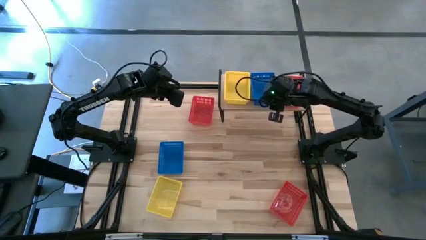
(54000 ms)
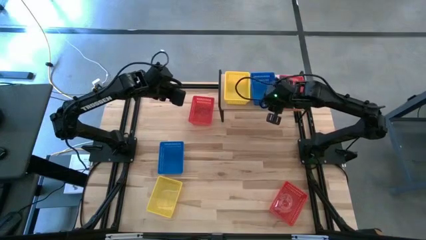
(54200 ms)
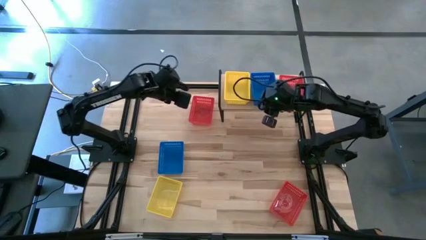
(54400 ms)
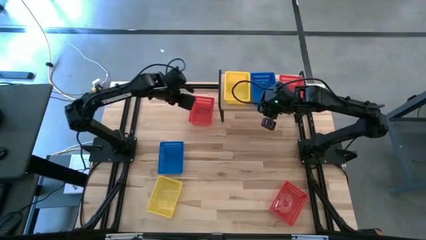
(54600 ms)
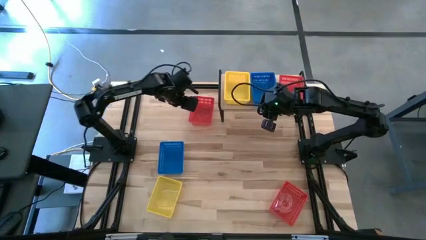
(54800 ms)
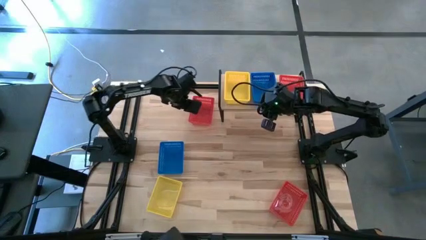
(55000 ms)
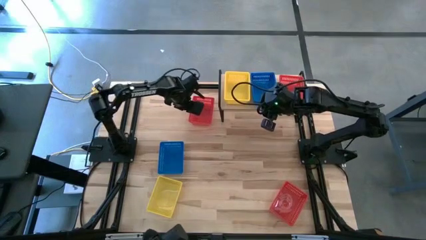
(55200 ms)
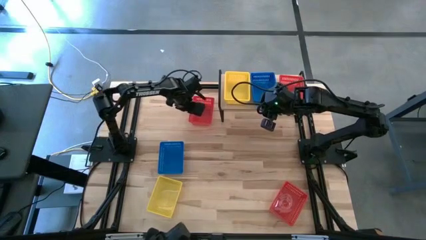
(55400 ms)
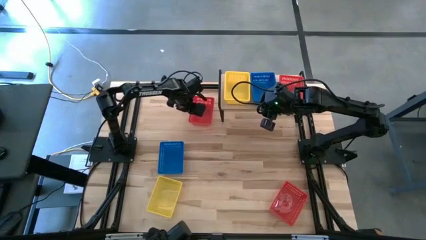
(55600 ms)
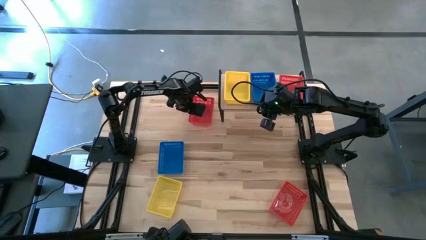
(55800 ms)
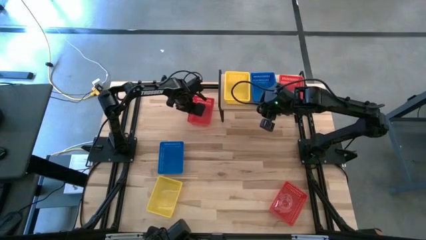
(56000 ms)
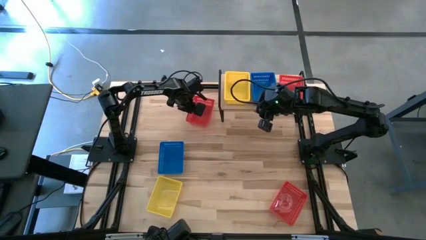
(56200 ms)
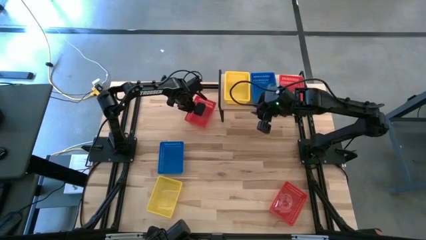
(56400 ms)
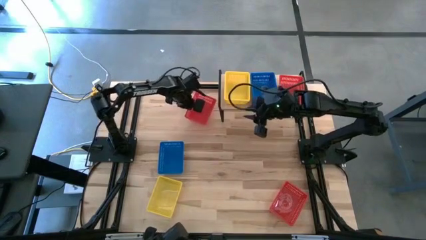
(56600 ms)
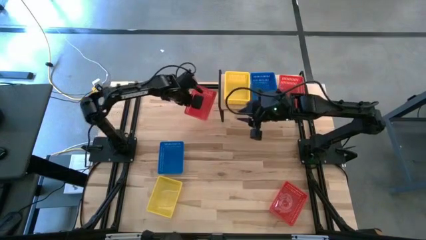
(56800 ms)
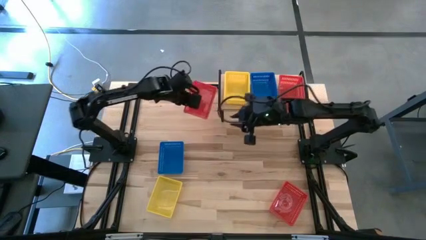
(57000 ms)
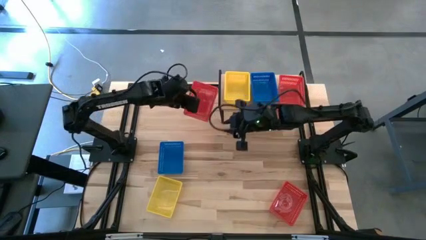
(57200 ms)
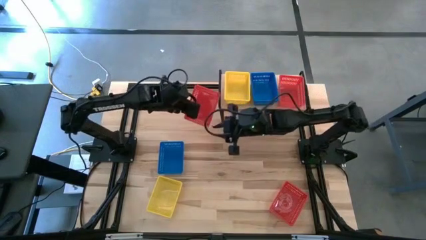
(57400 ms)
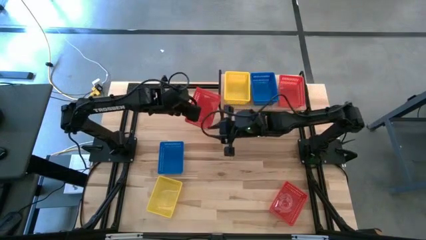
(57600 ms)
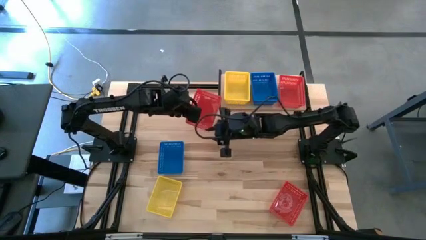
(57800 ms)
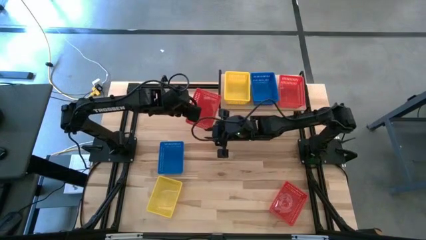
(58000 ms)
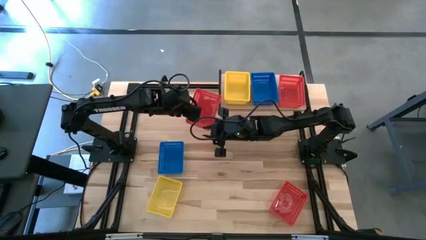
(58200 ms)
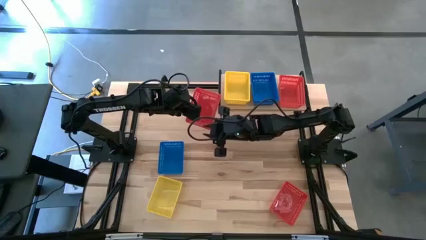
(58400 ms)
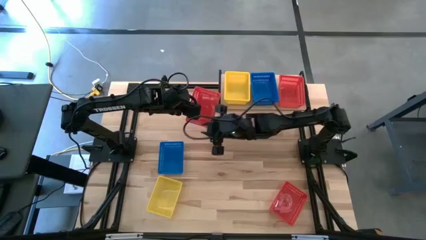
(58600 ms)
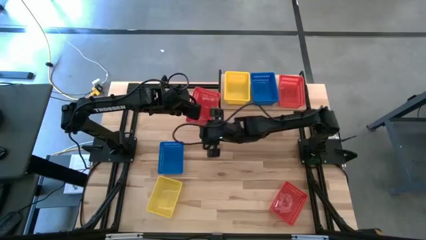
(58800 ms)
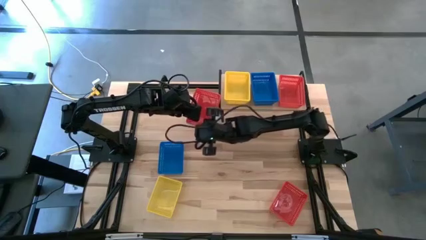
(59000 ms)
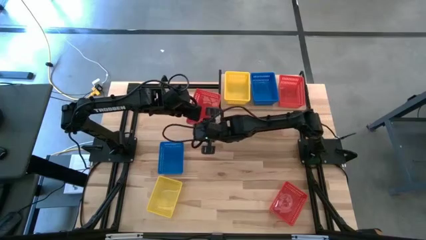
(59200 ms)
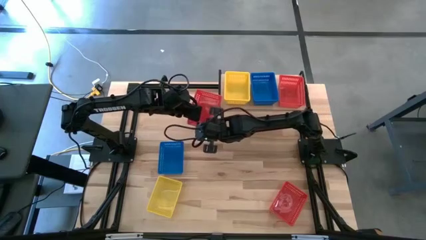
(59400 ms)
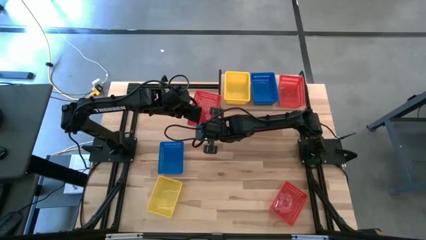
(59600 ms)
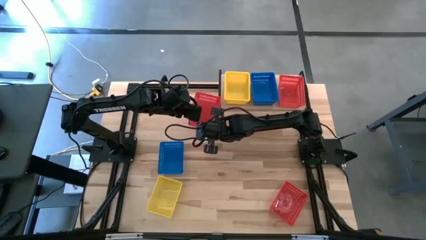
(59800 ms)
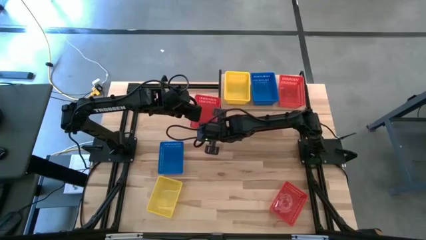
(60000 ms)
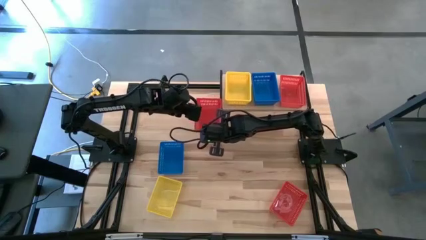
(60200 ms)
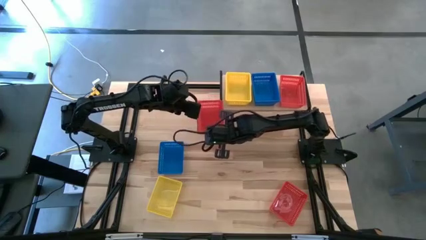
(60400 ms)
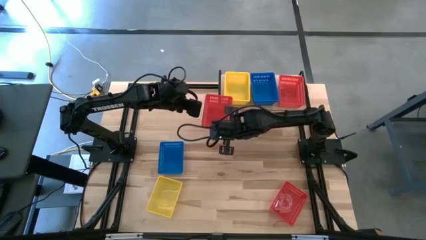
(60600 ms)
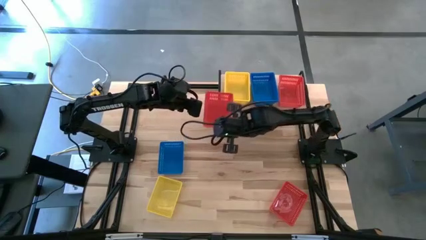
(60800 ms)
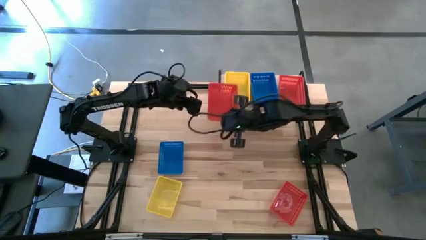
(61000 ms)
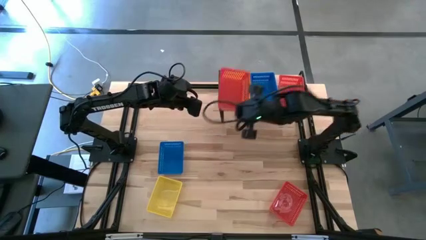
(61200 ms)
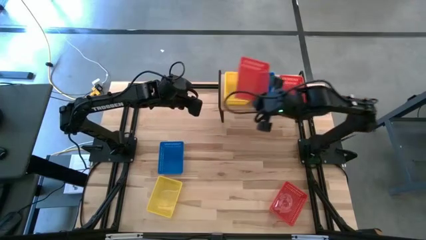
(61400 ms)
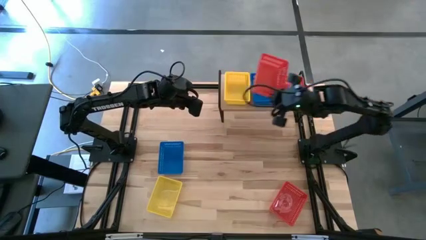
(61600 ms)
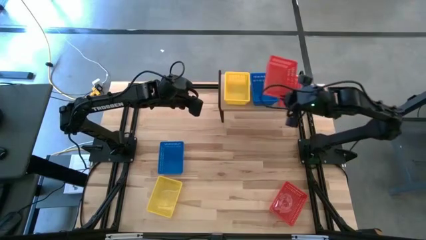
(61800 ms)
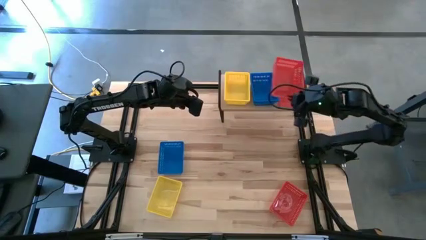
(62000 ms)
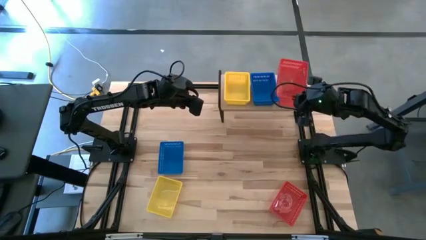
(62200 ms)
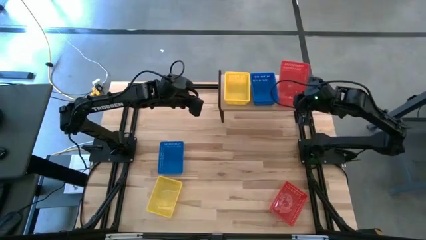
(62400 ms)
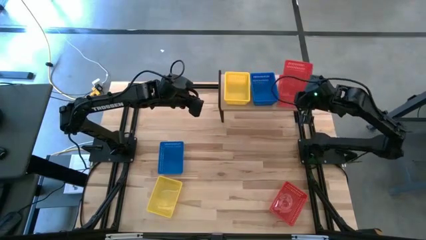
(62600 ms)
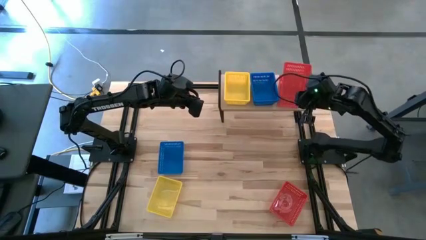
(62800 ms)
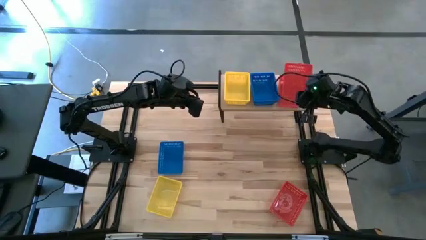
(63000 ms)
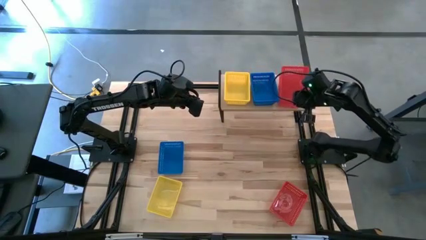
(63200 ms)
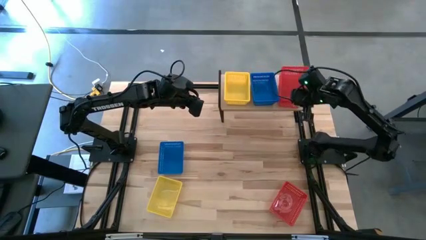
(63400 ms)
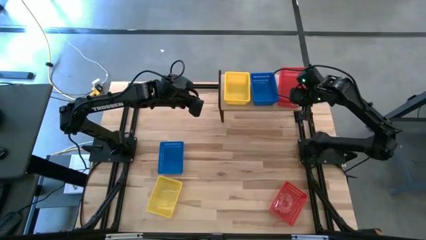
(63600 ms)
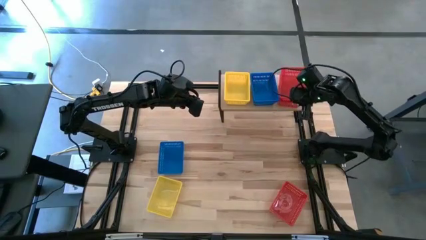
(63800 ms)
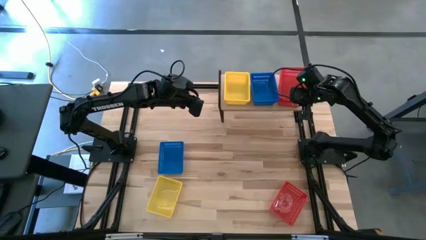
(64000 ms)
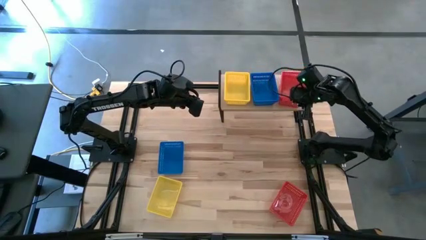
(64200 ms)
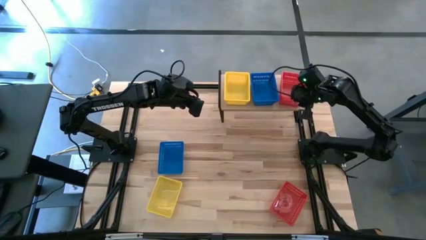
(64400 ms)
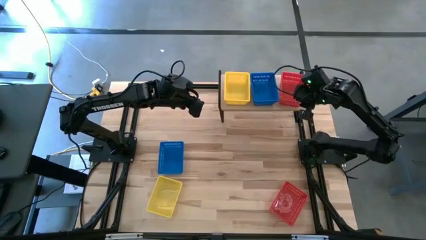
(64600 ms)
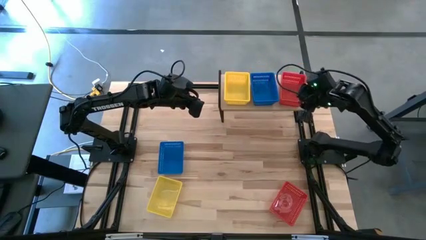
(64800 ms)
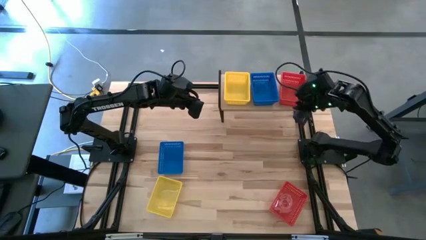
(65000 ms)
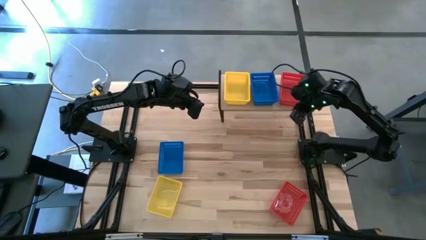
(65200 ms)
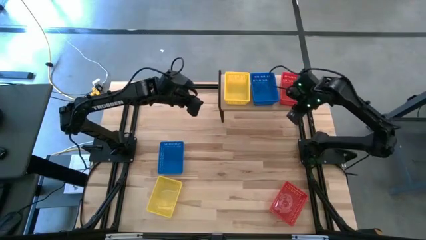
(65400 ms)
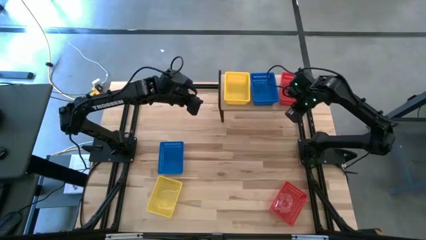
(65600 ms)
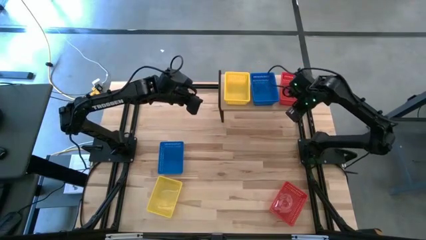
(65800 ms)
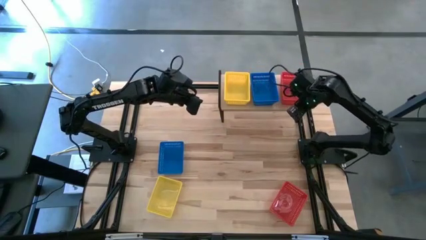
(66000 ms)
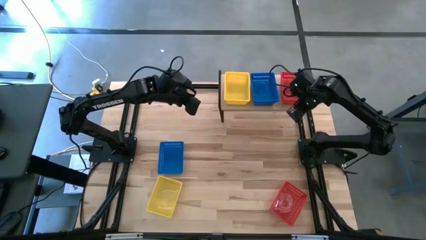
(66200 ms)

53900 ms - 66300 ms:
Task: Stack baskets on shelf by color
Stack the top red bin on top of the other red bin on the shelf

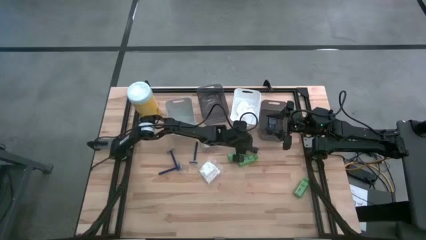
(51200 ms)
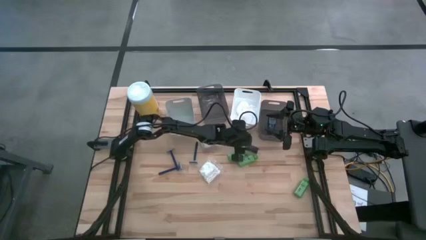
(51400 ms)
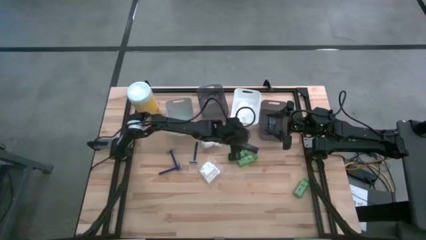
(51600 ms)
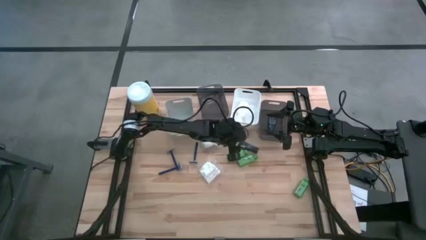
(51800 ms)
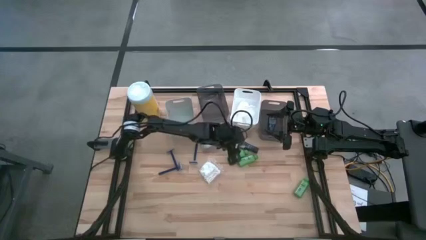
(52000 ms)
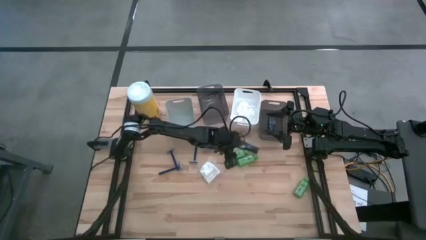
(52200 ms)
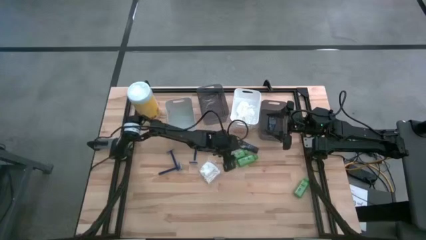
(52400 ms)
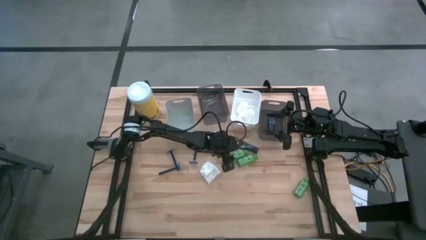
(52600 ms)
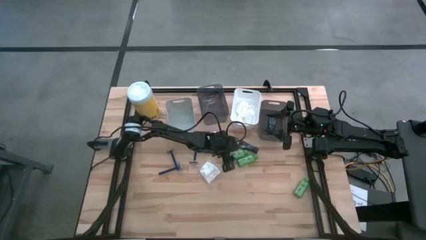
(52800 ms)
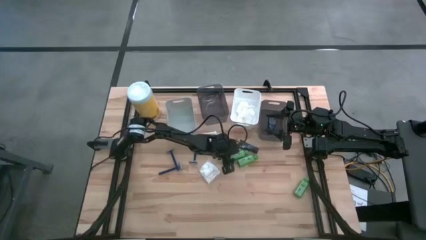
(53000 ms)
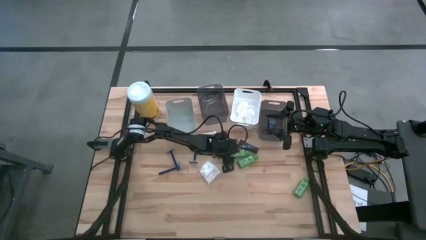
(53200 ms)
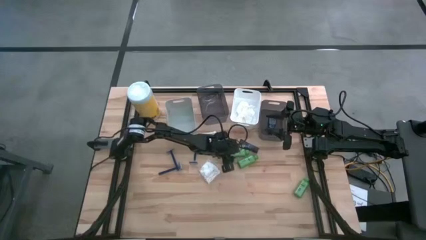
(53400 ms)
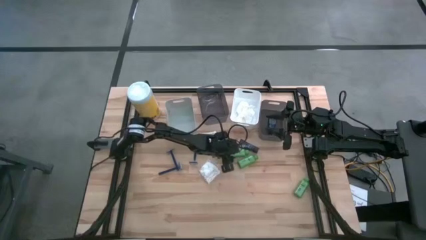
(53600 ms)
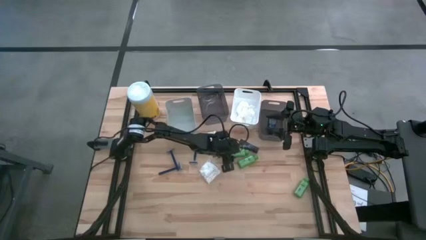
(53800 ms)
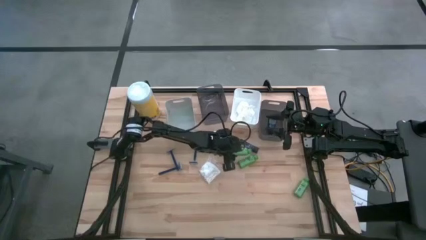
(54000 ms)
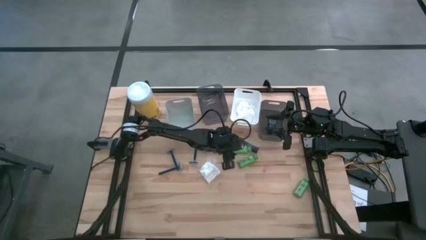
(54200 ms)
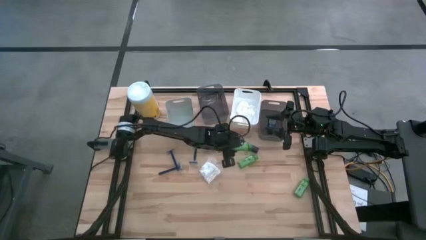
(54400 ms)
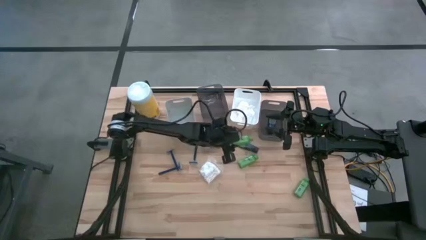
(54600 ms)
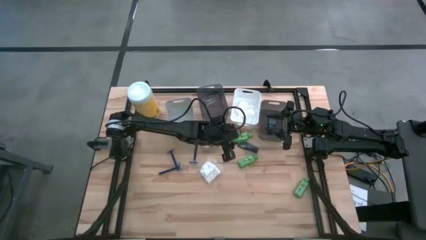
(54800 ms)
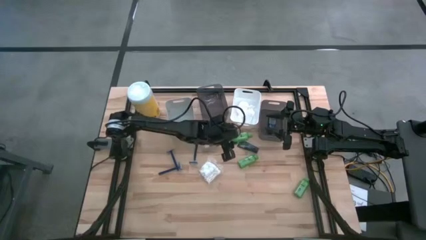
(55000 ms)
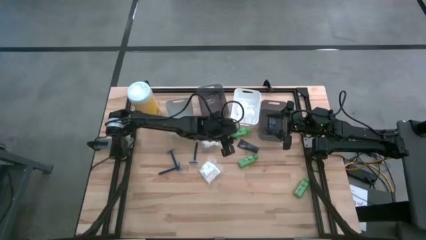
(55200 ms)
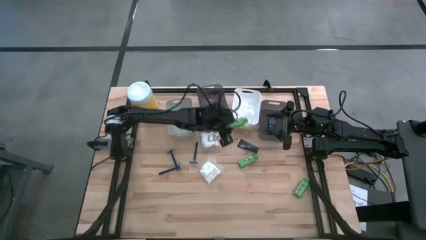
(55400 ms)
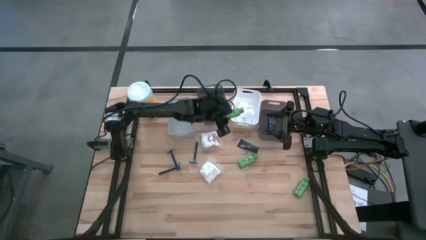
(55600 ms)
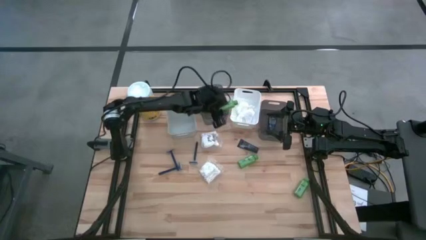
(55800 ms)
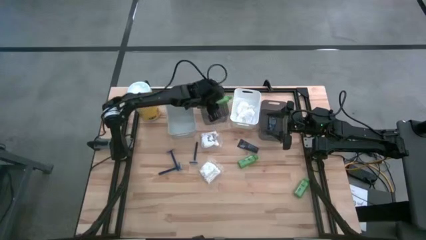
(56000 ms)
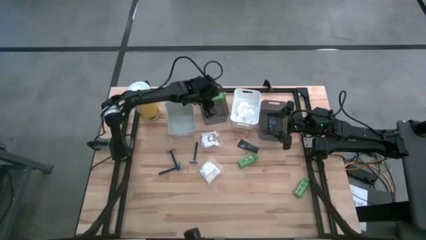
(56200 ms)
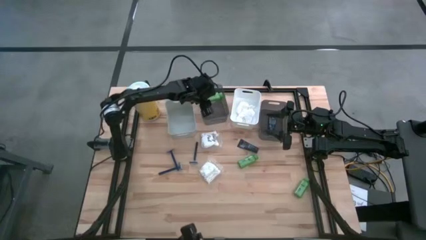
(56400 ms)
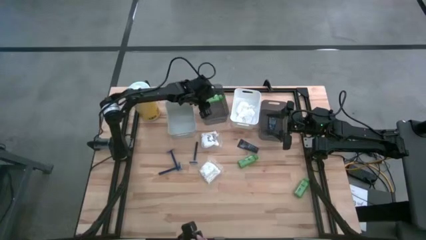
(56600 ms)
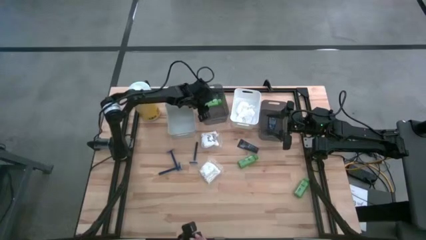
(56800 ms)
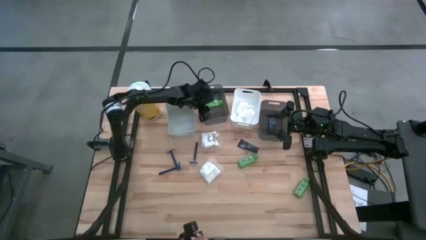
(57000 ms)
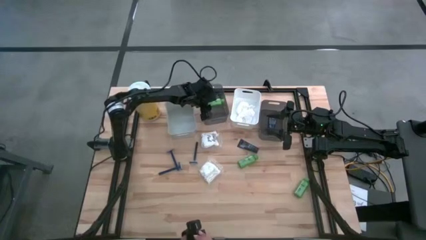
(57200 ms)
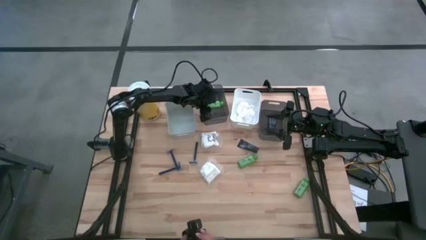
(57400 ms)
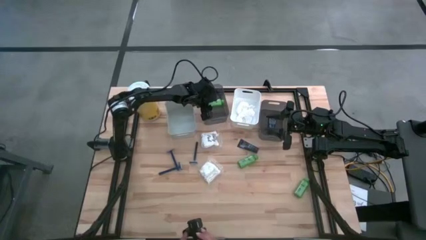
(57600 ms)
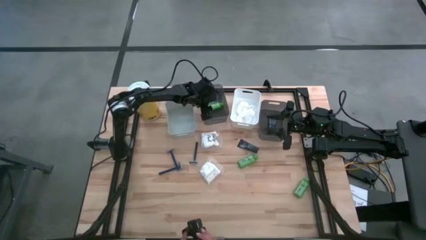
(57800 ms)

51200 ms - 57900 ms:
Task: Pick & Place Travel size toiletries
Put the green shampoo into the left black bin
